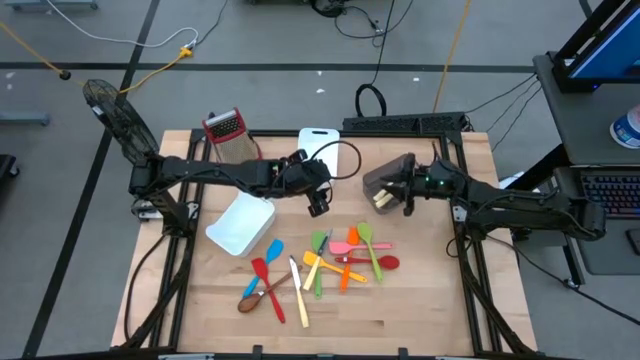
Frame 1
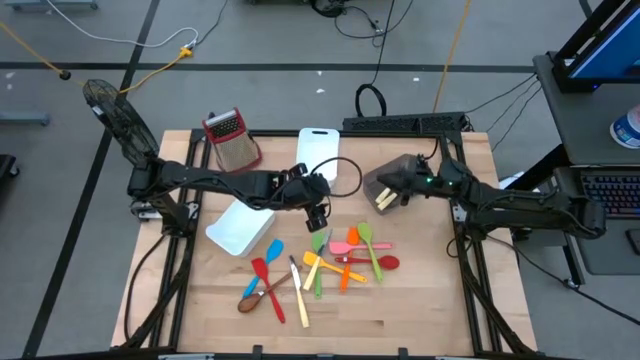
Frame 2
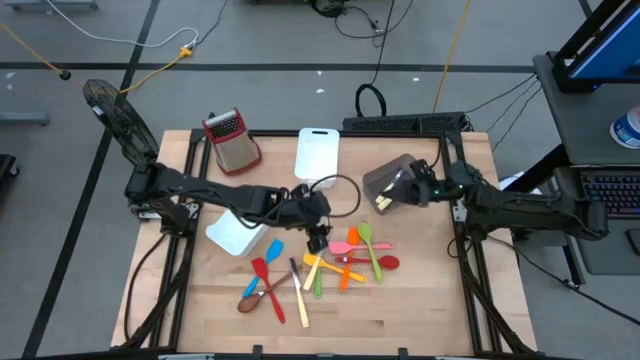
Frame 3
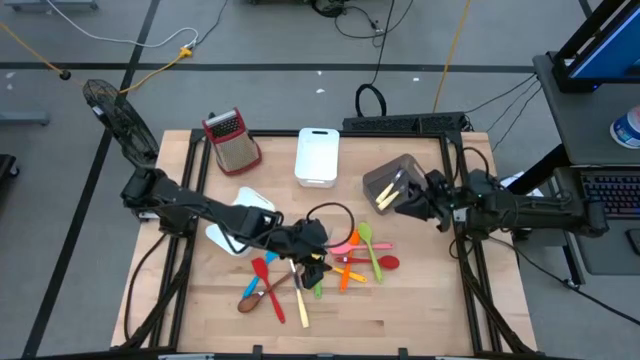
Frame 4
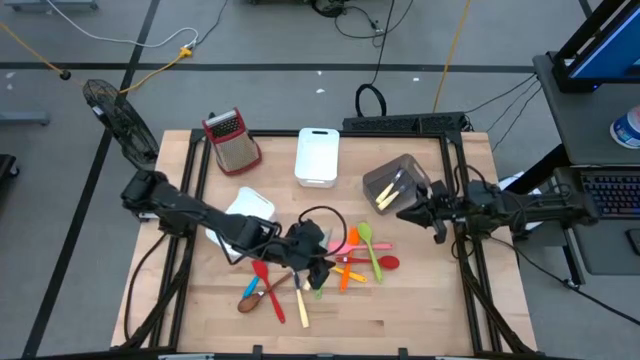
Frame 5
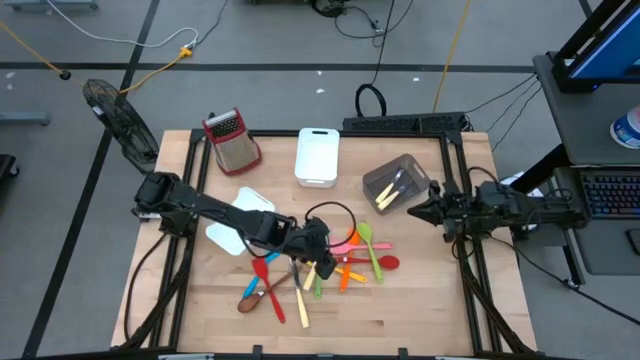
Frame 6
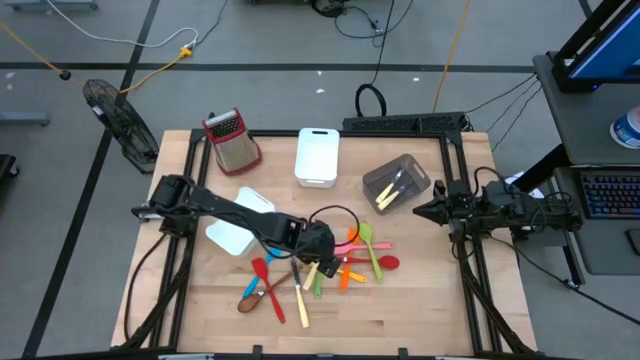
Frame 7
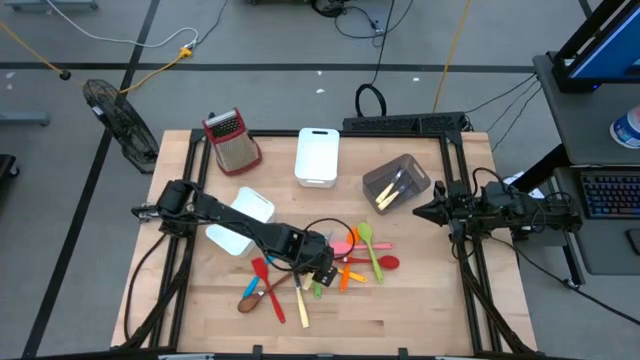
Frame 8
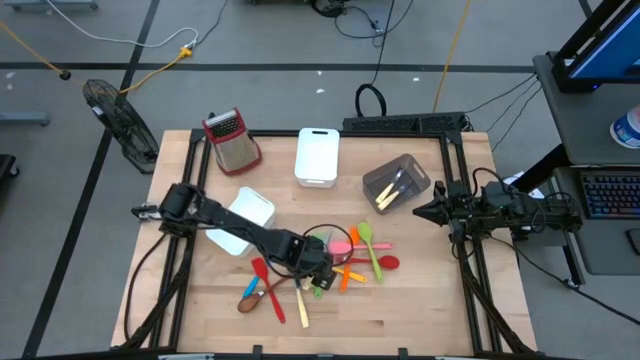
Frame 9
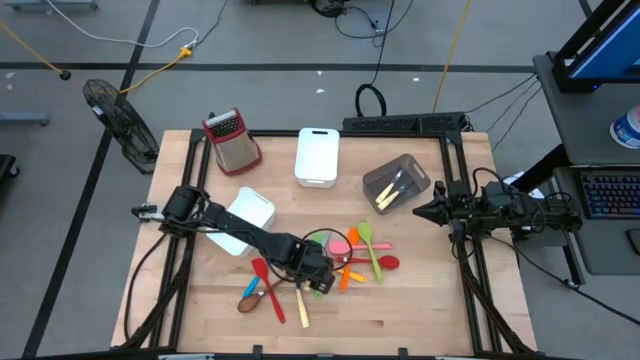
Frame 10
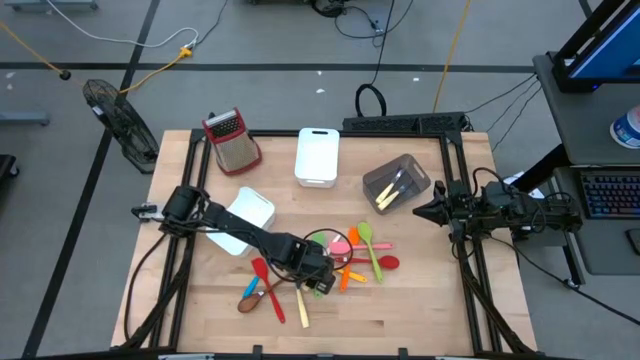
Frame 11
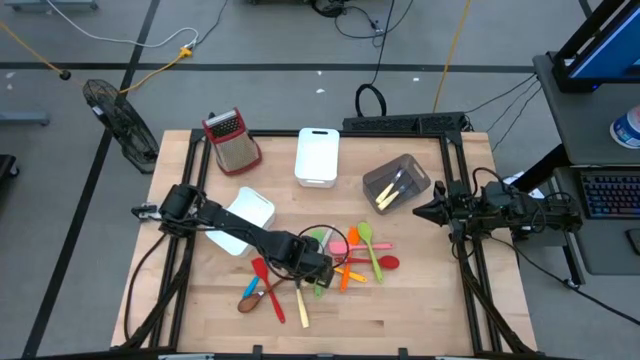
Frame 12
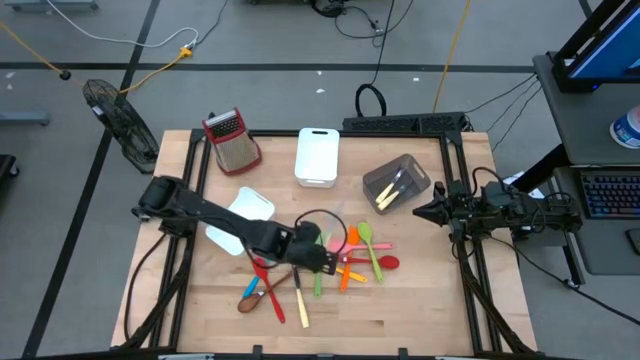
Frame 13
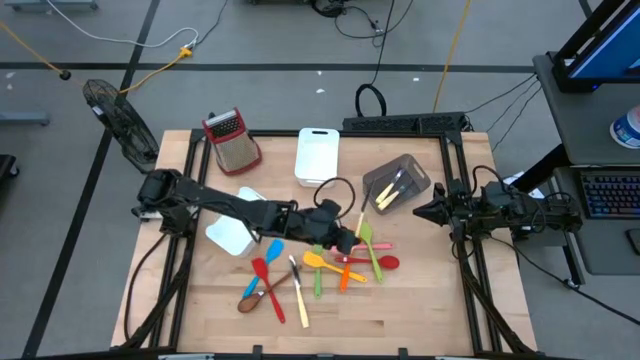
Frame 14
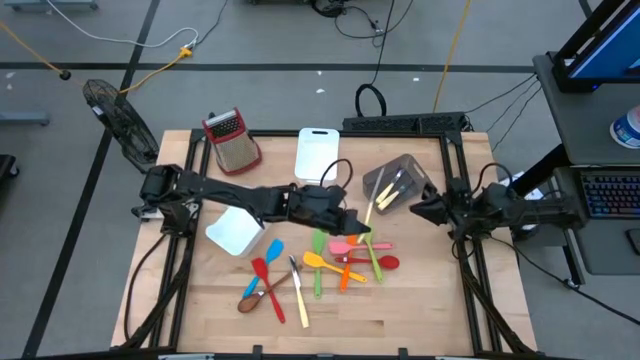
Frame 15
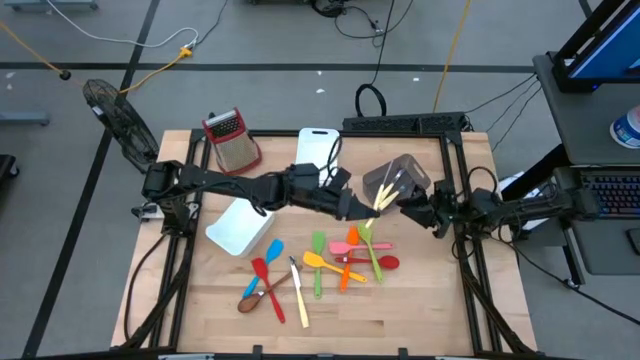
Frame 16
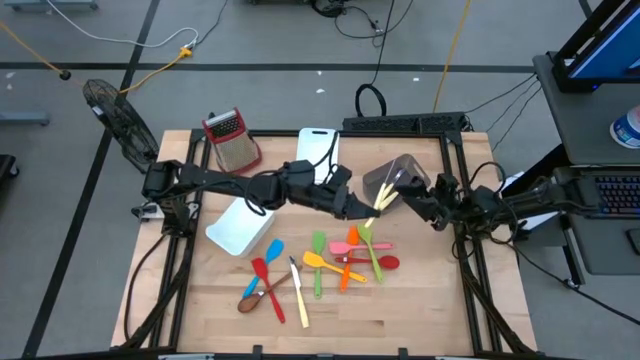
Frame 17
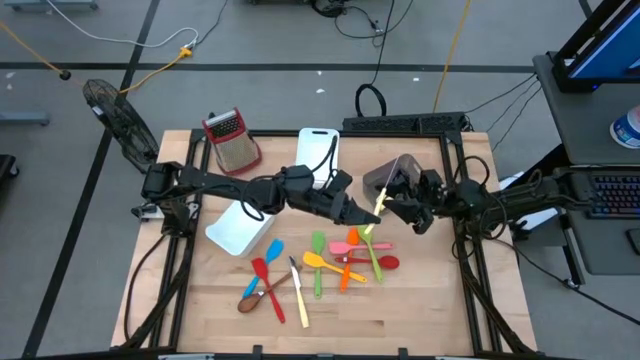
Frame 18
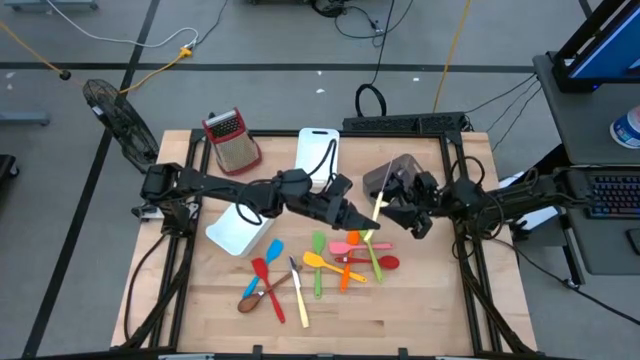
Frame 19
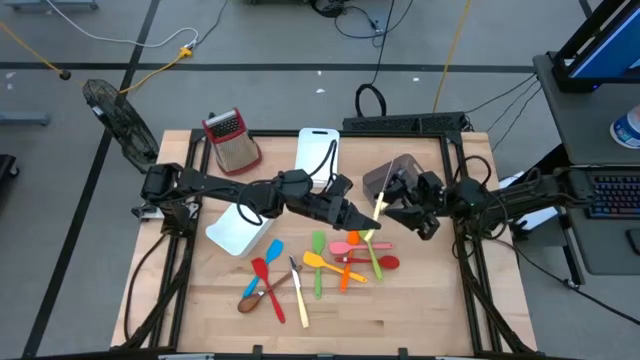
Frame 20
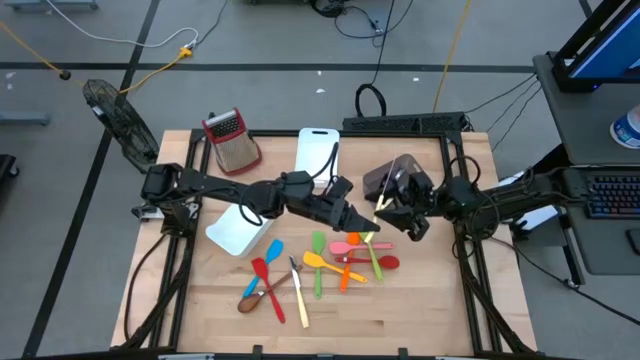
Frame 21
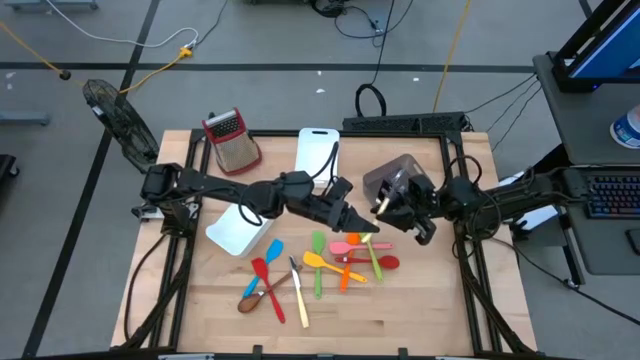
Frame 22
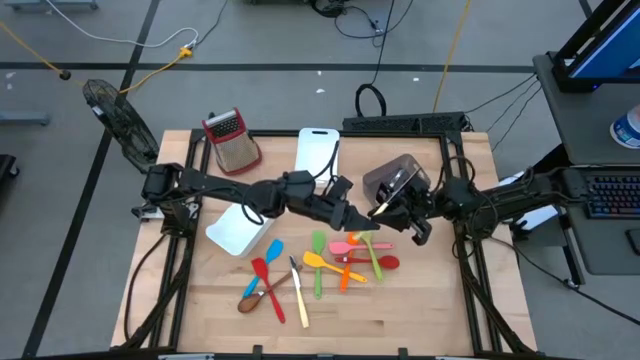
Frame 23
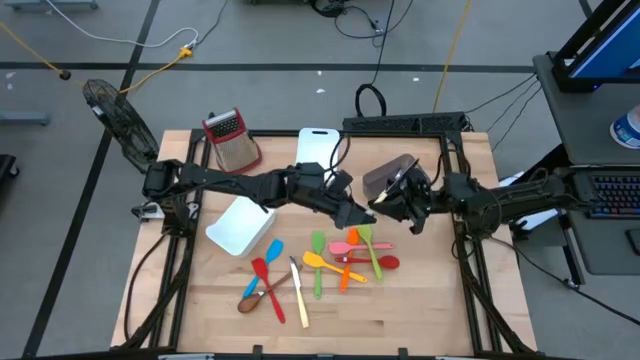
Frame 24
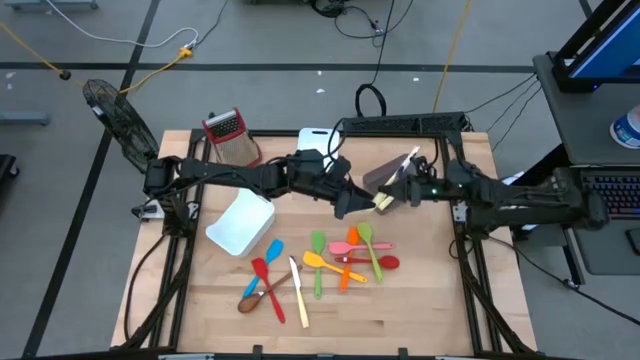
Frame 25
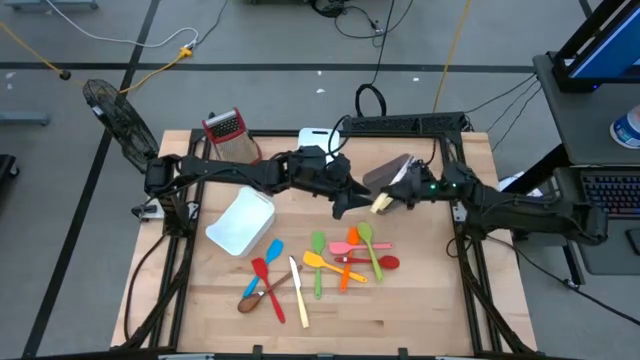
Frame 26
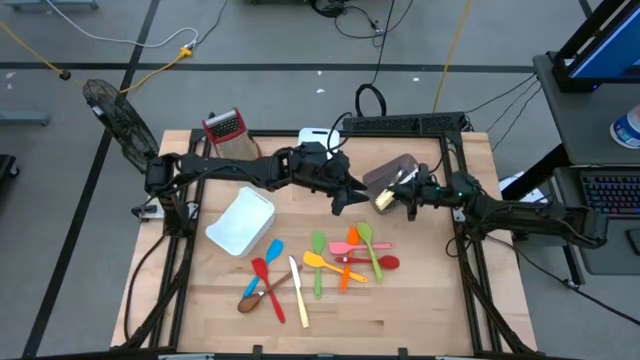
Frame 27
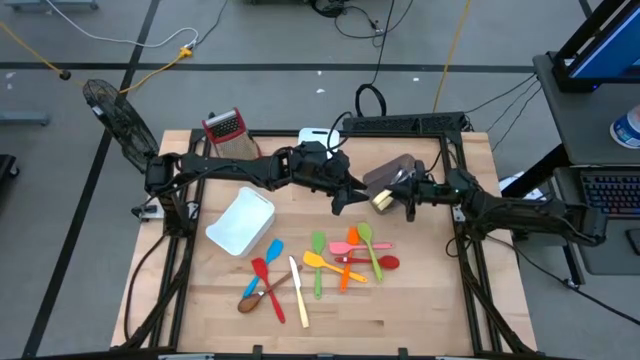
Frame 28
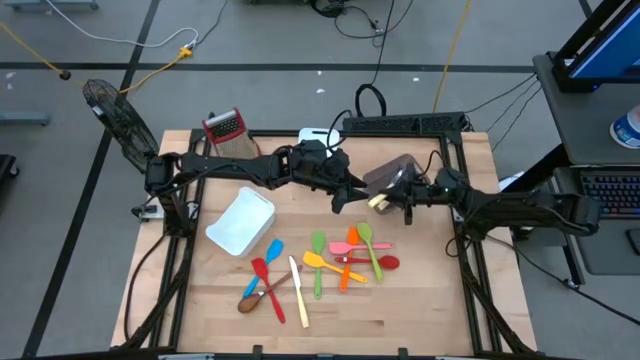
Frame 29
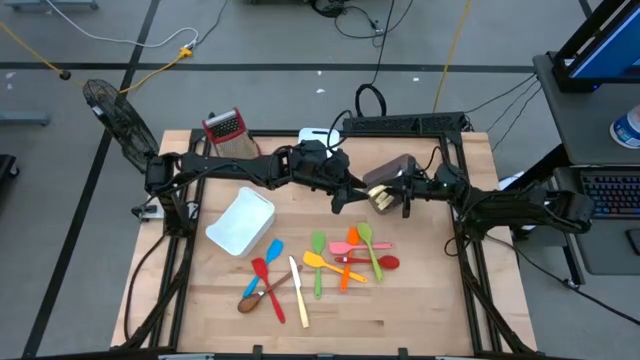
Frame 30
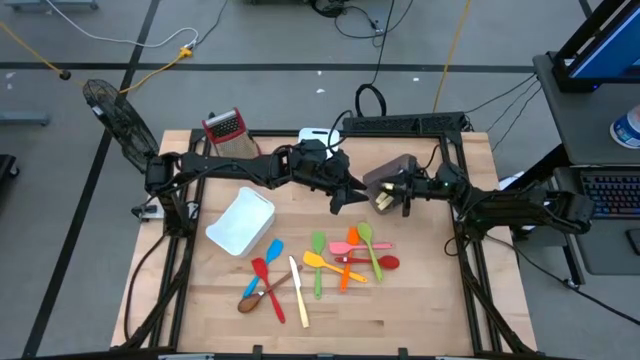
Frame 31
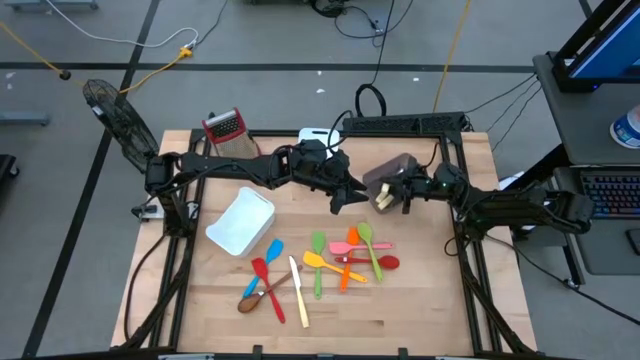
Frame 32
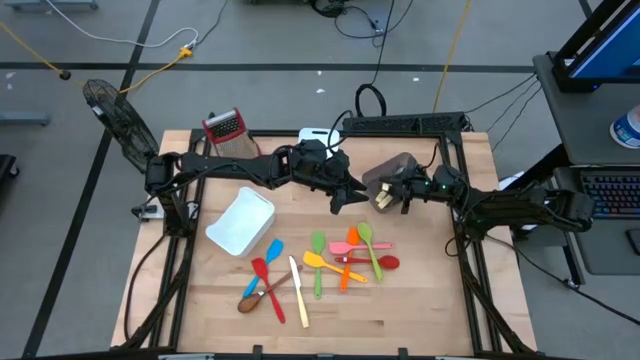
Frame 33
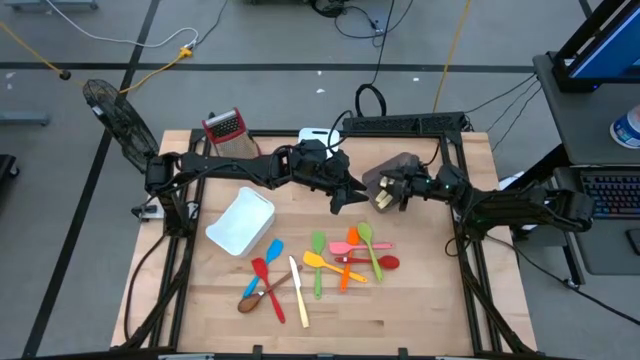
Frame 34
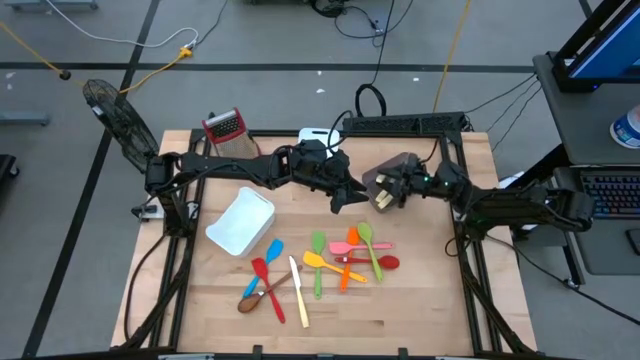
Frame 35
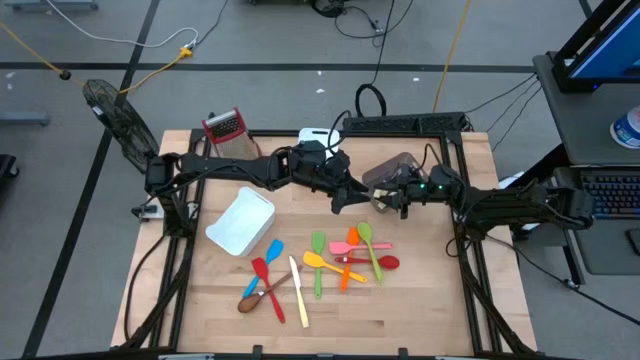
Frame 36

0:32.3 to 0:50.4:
Task: Pick & Place Kitchen Items
Put the yellow table knife into the black bin
